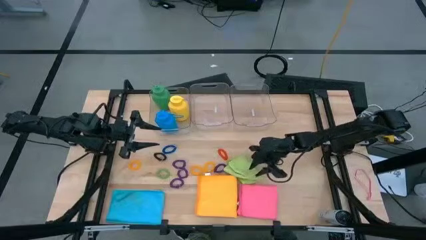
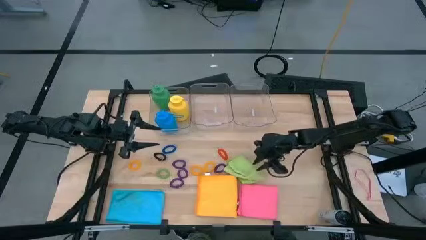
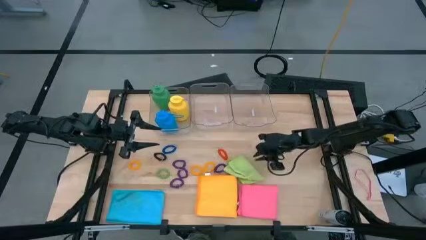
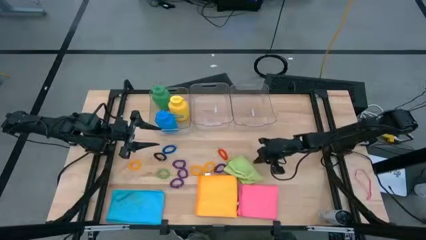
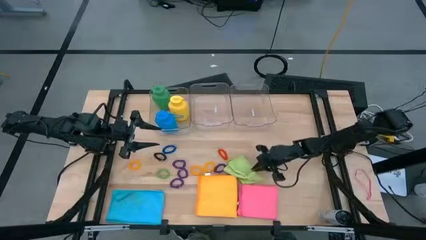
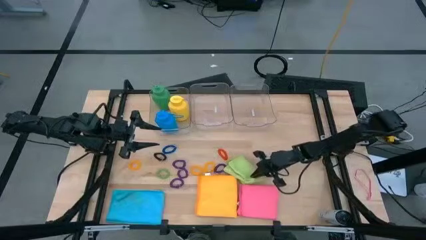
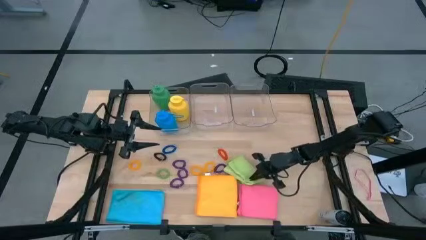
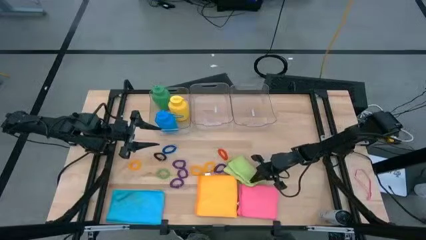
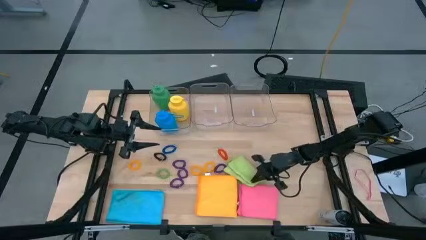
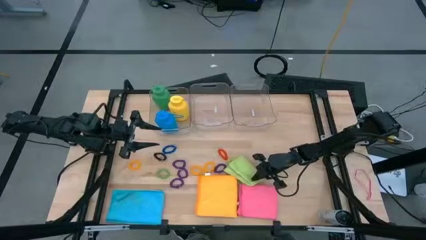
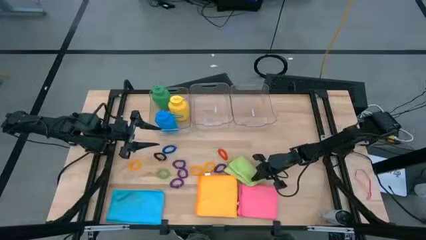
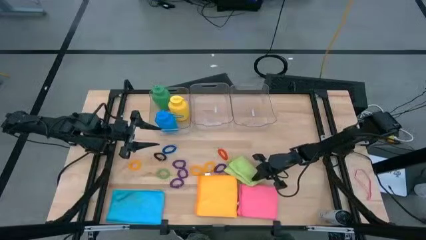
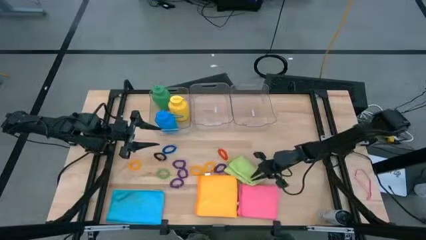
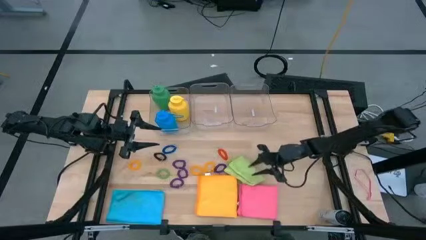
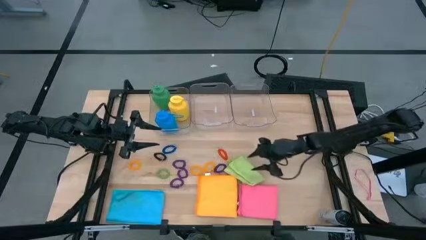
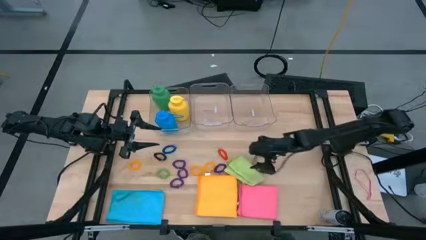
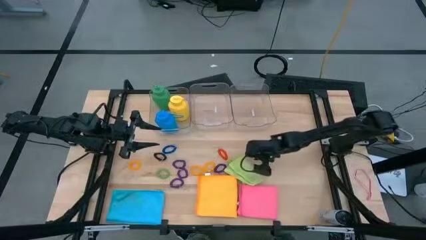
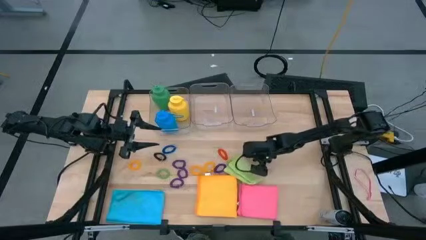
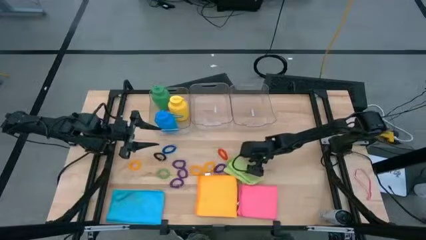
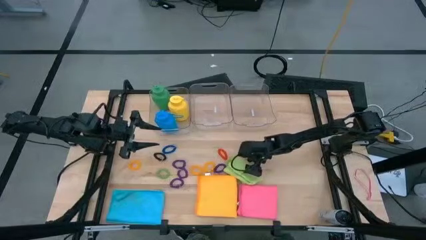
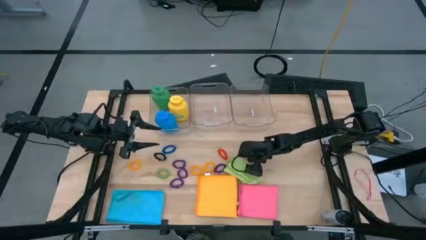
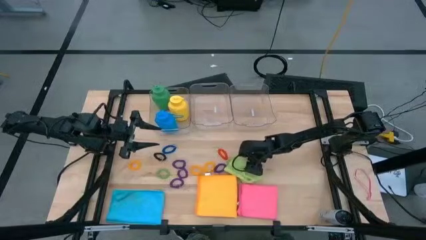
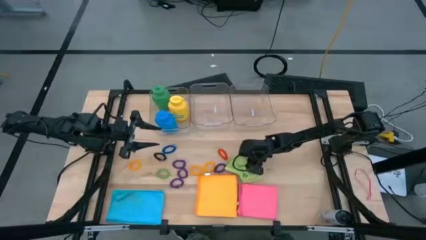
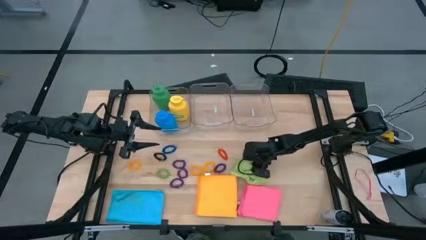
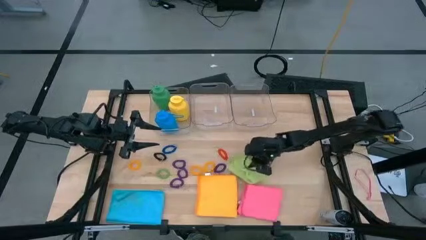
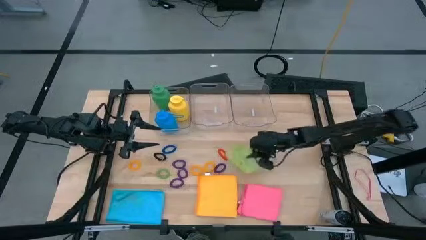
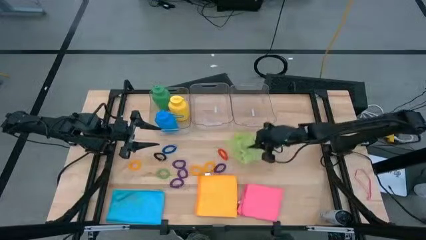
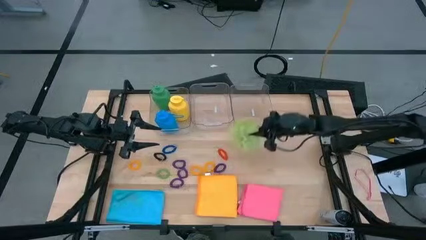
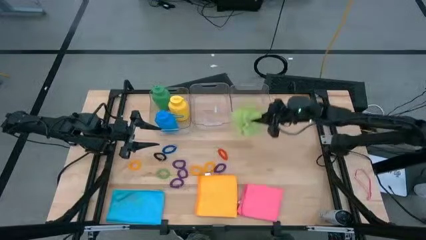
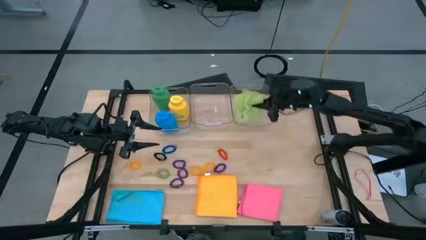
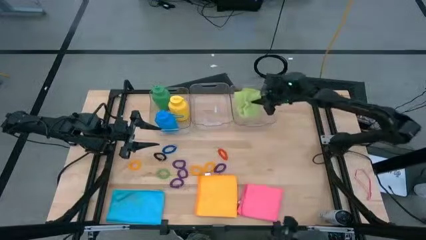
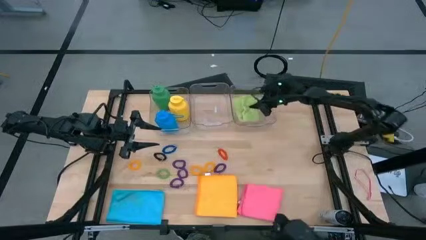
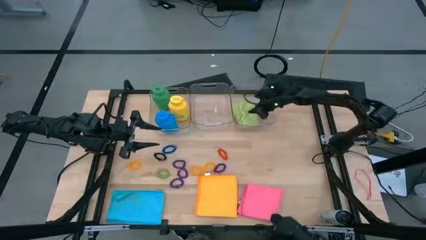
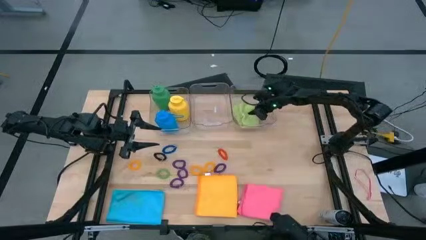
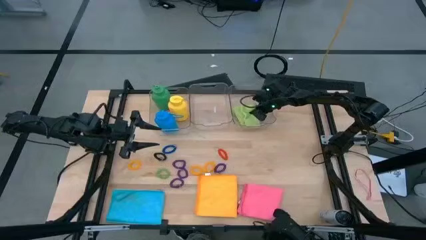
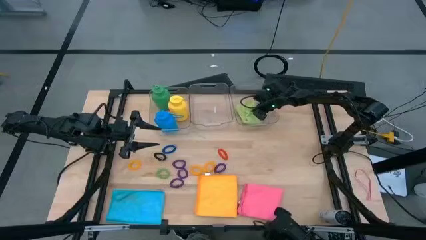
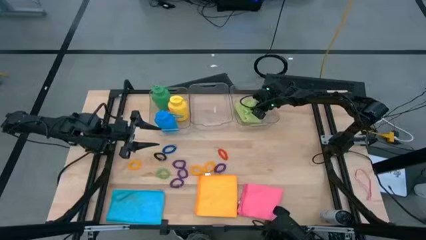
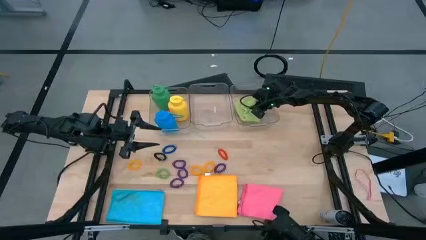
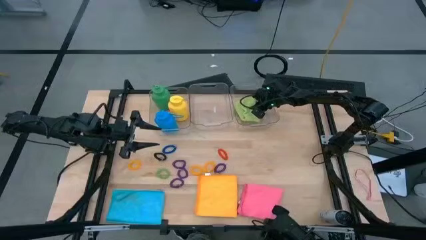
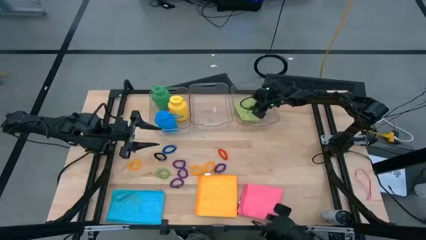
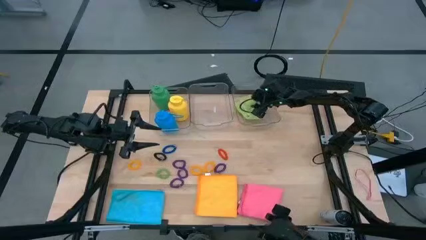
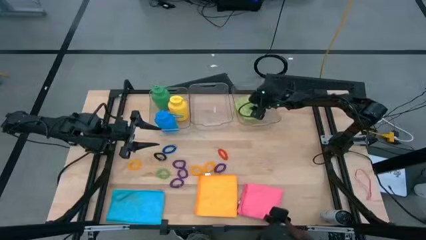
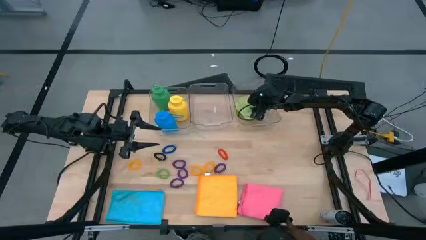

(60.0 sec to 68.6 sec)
Task: Pick & Place Sports Items
Put the green cloth into the right transparent bin

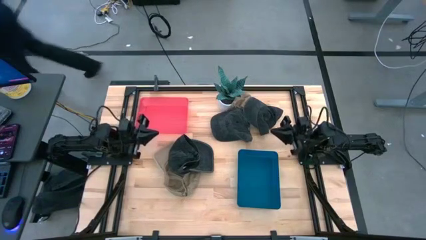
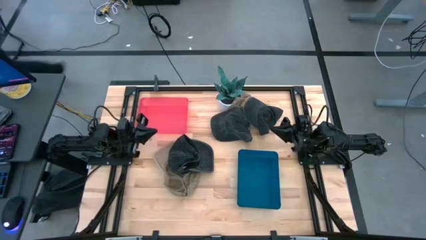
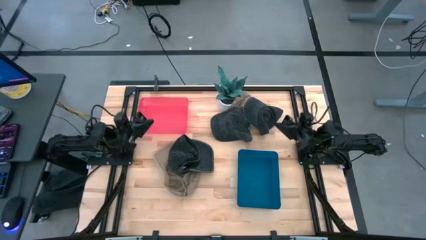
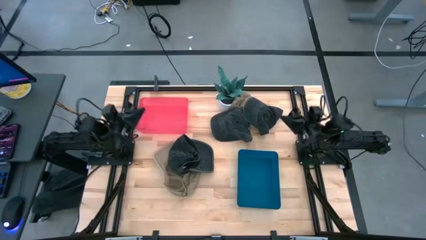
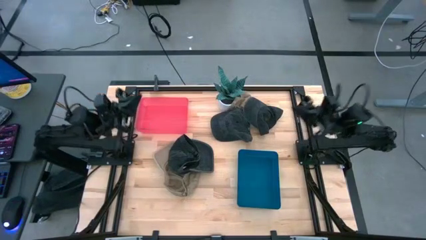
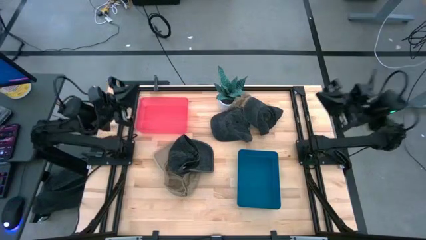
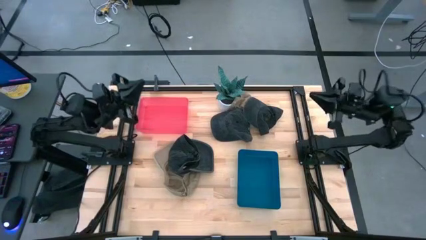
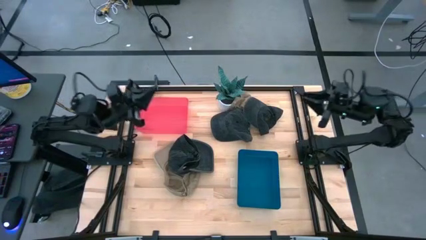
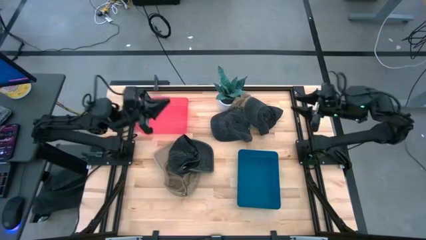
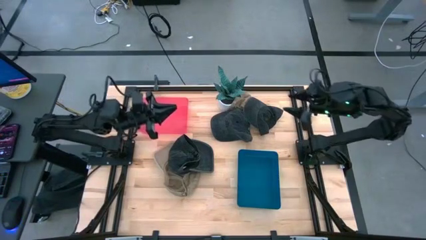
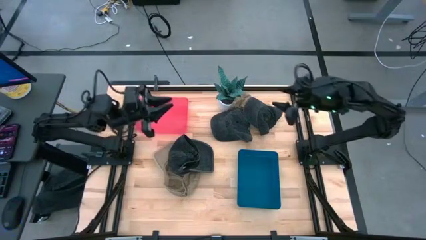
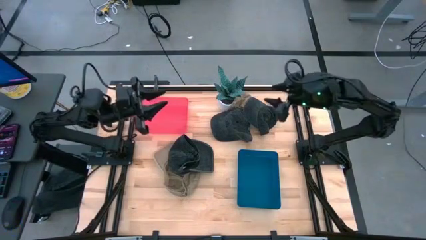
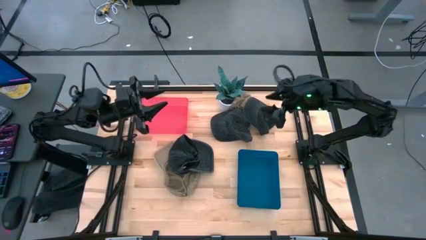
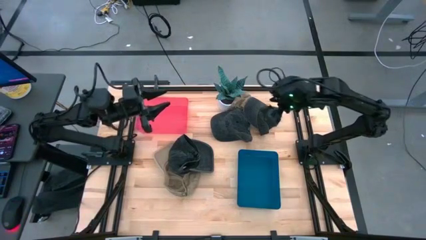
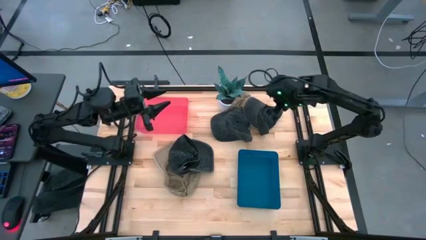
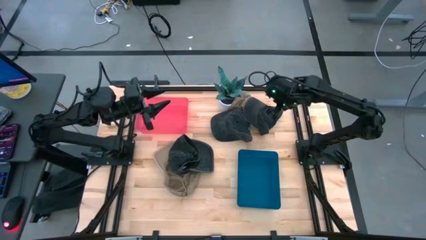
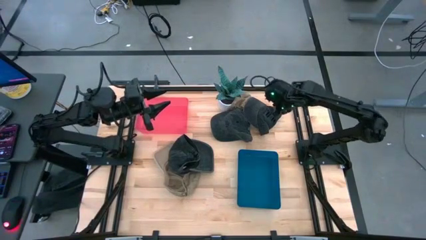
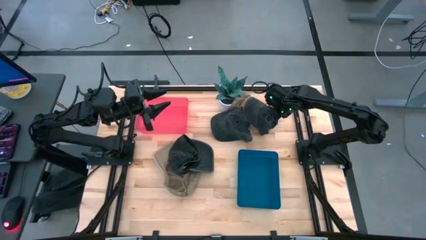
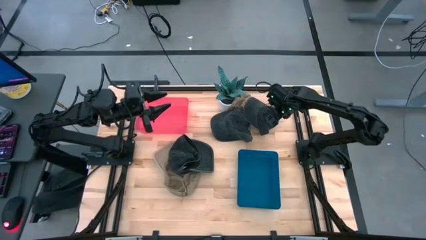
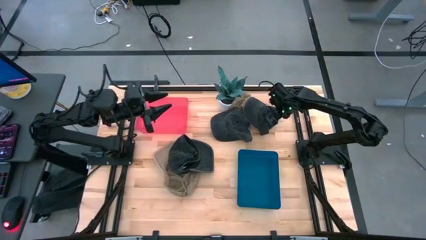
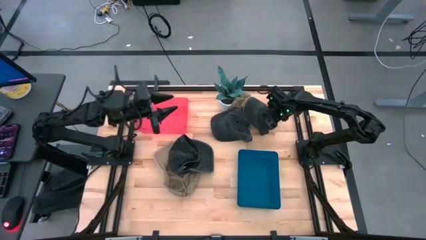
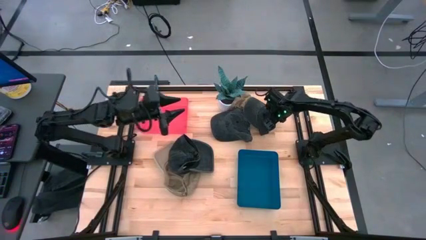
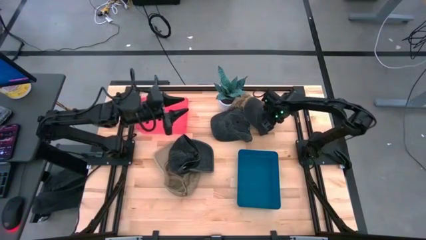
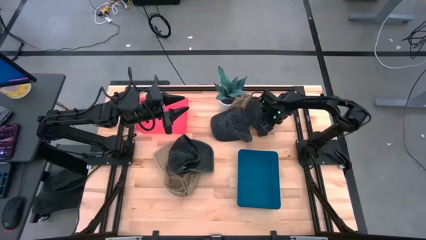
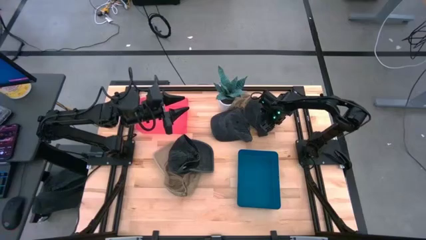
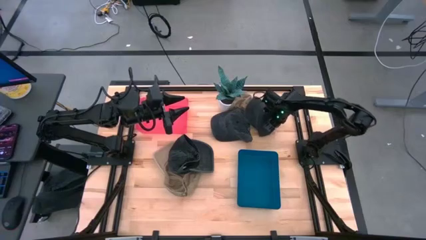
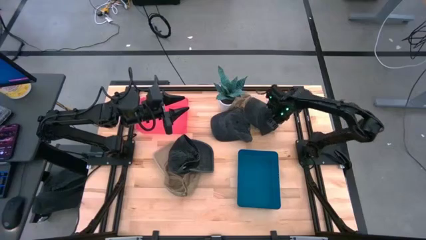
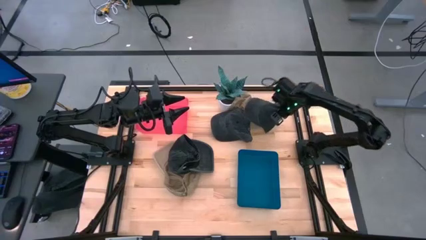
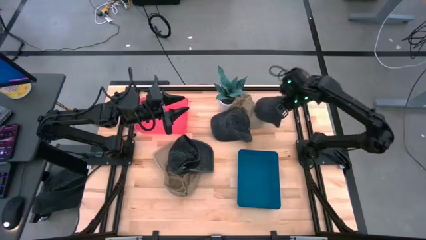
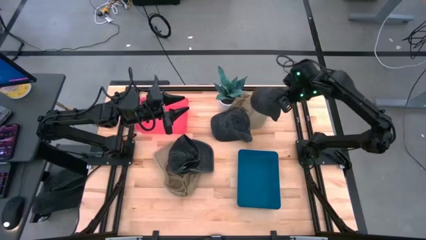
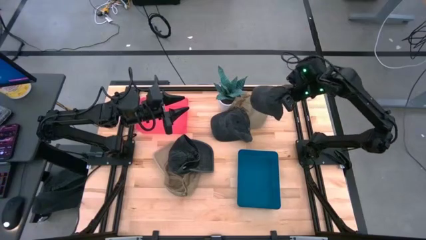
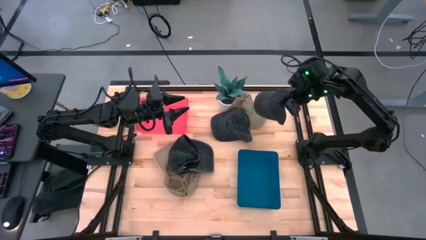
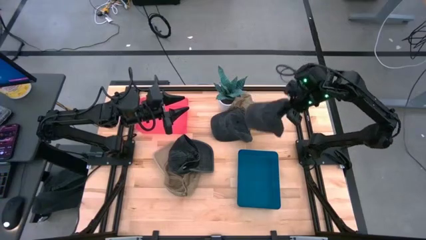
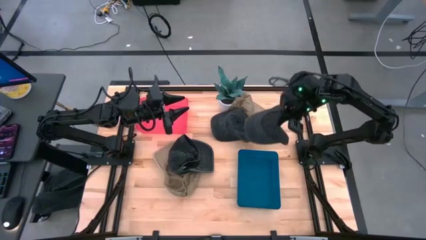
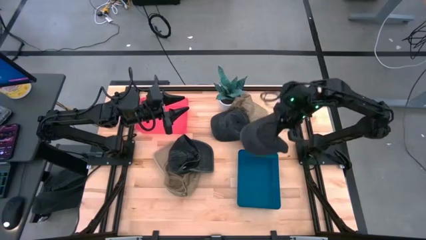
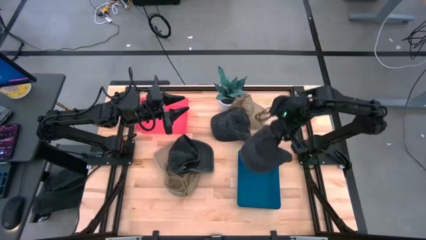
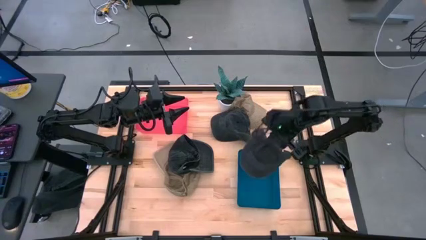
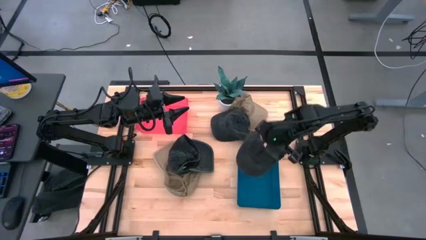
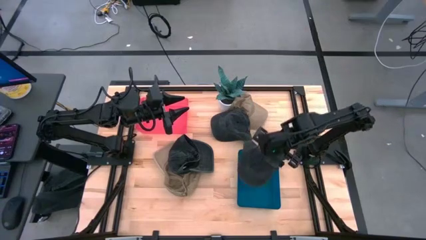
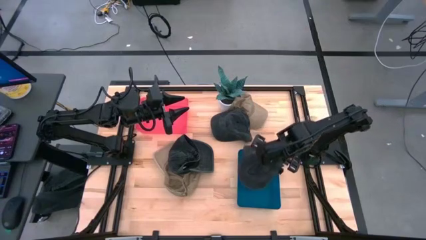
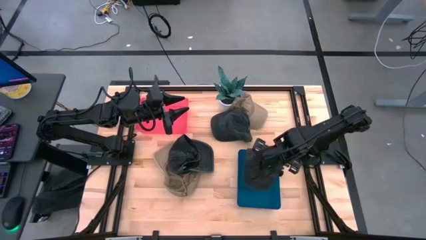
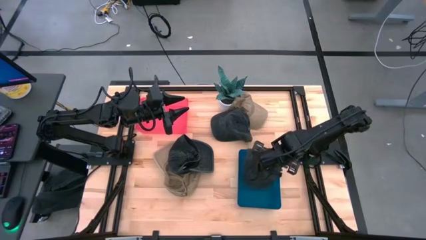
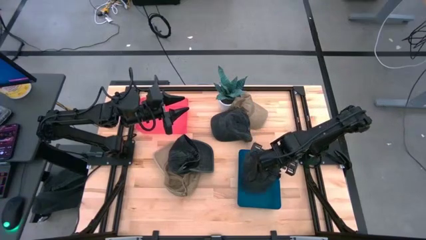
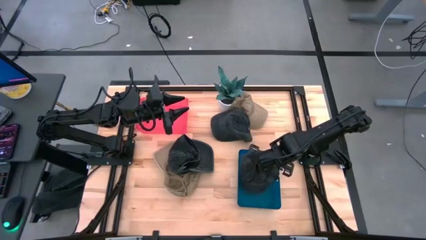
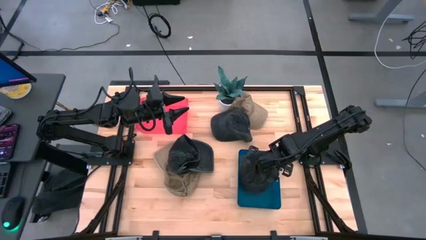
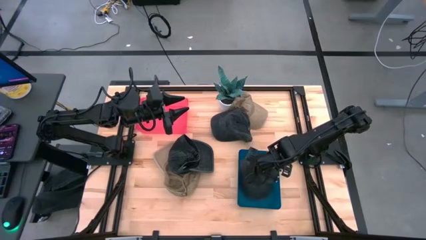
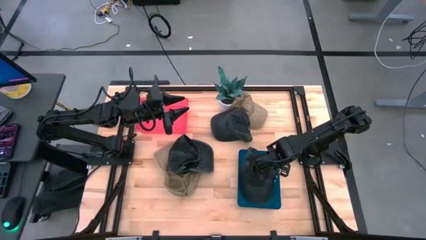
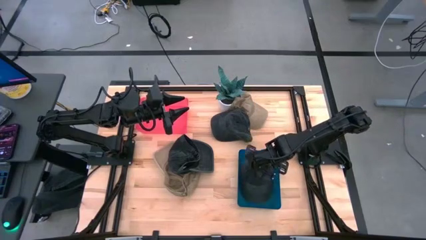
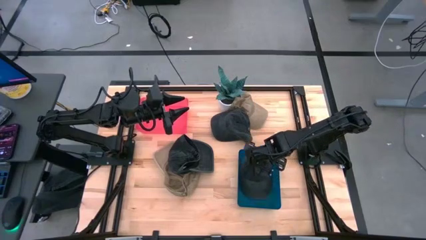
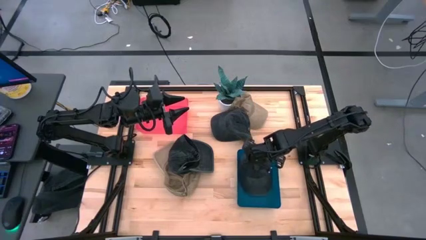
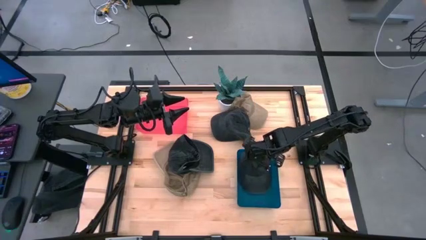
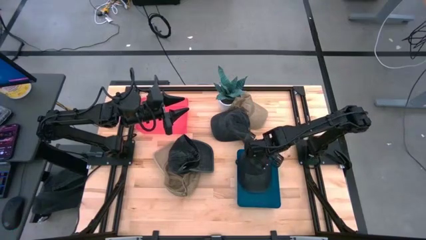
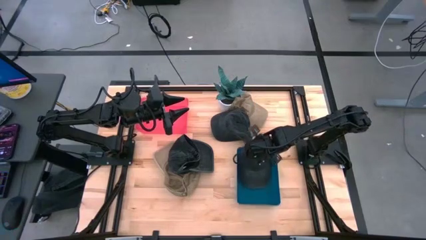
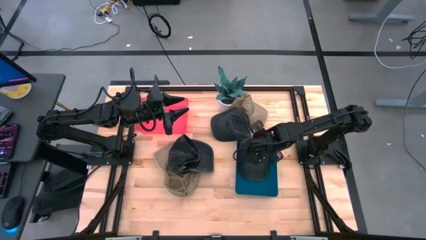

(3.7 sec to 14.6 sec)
Task: Pick & Place hat
Put the top right black cap into the blue bin
